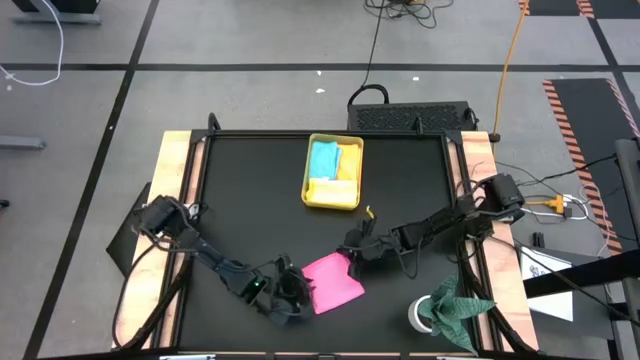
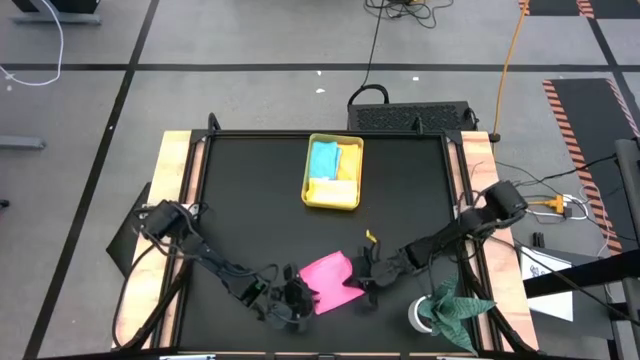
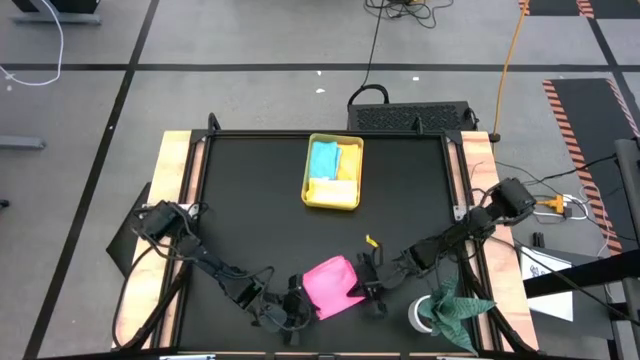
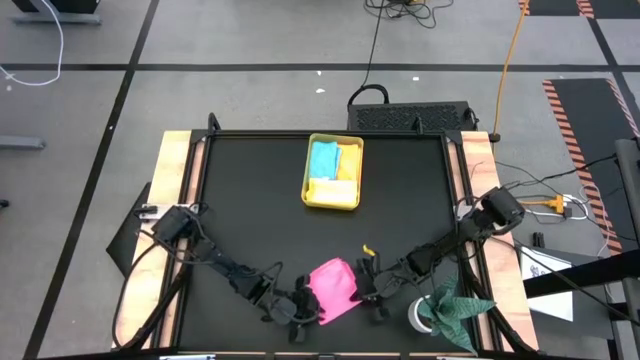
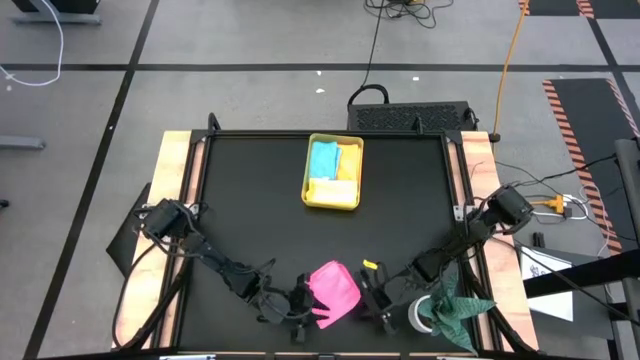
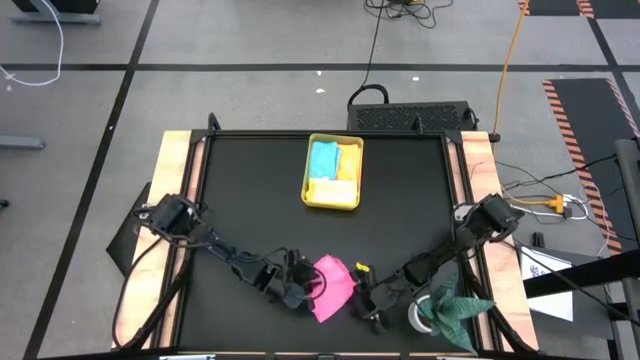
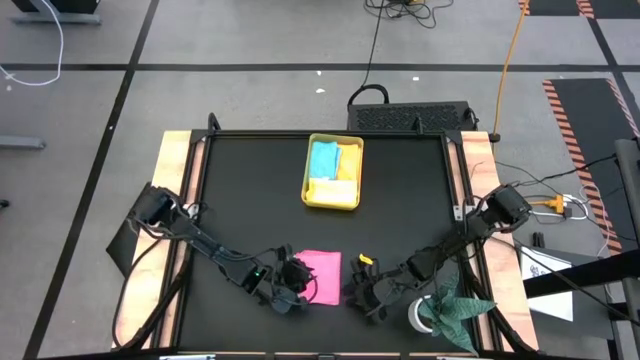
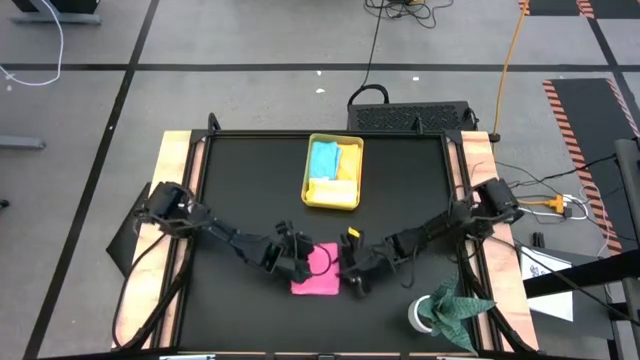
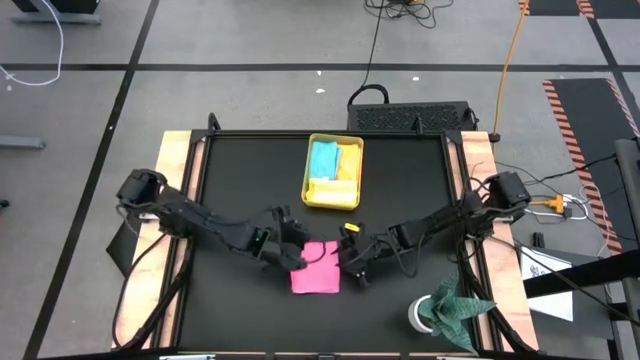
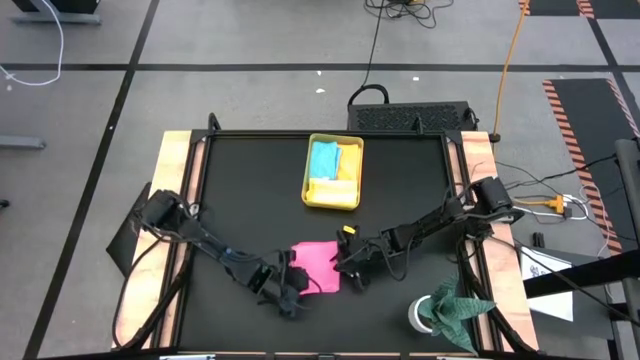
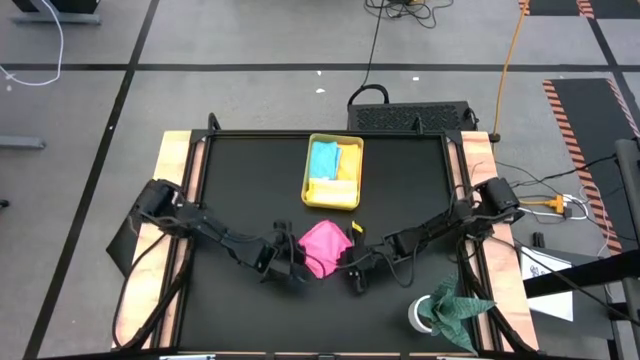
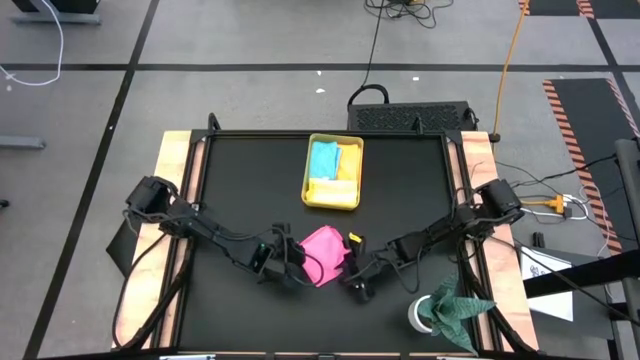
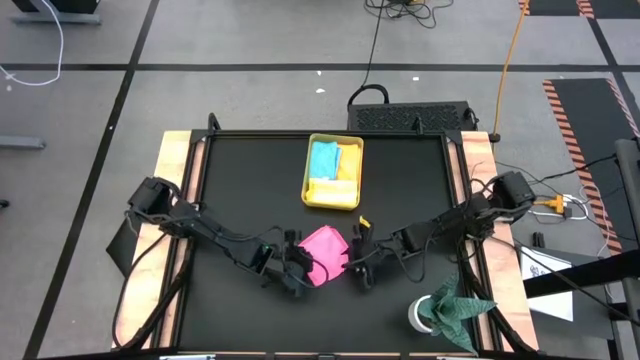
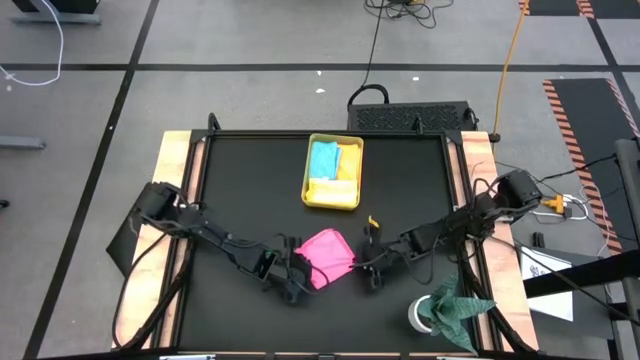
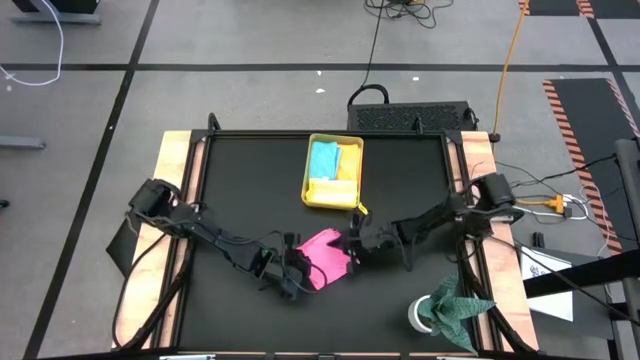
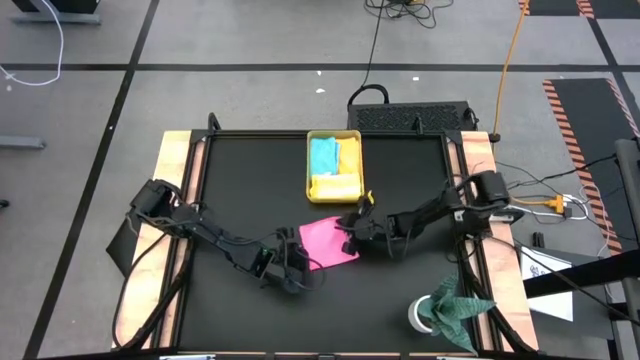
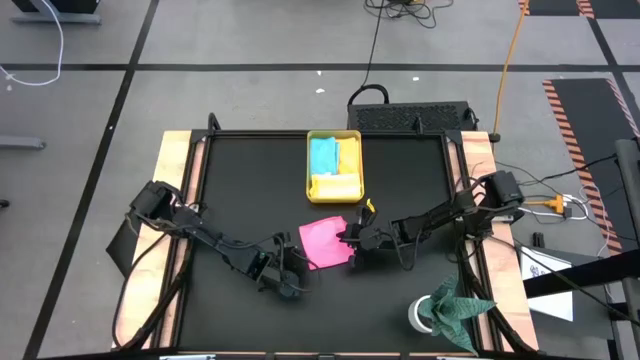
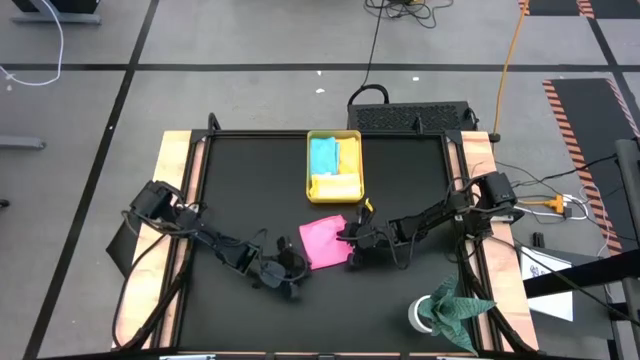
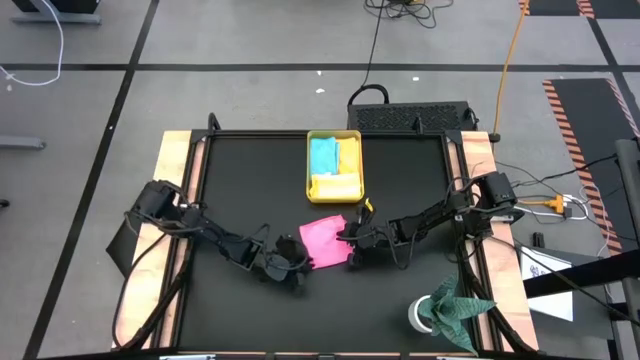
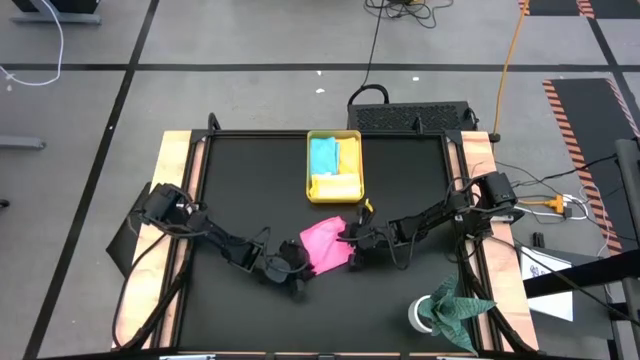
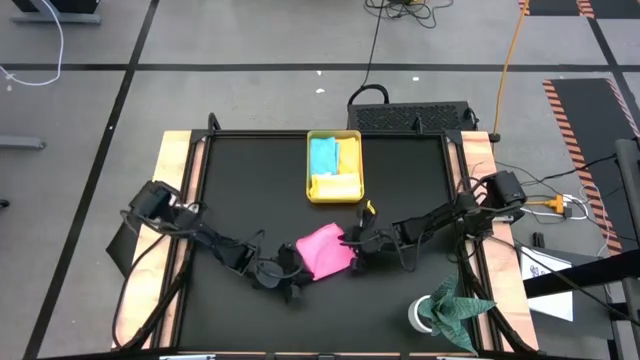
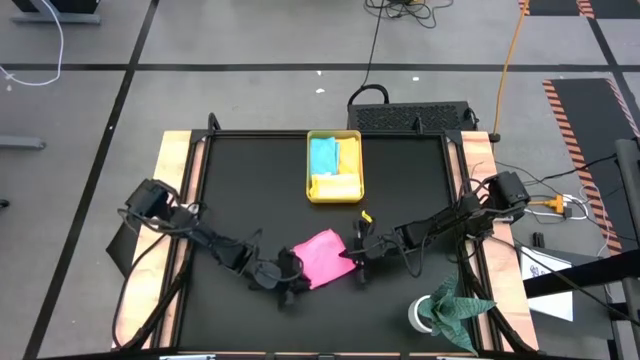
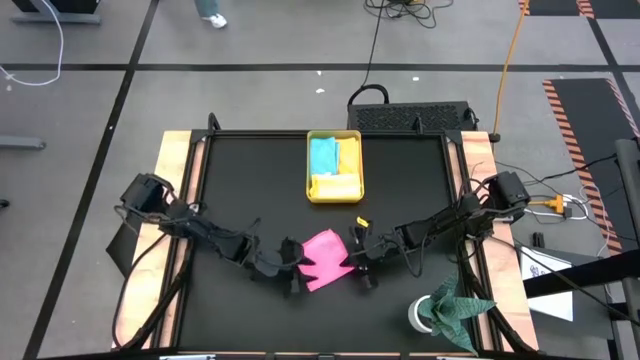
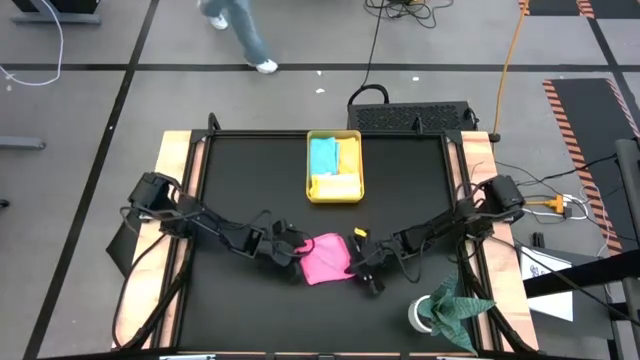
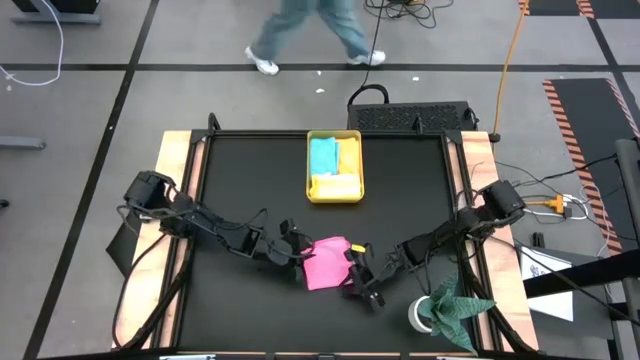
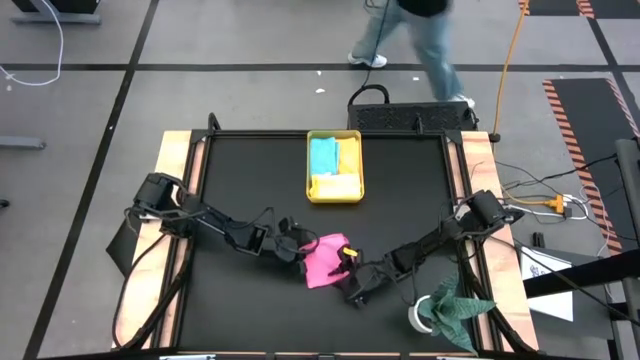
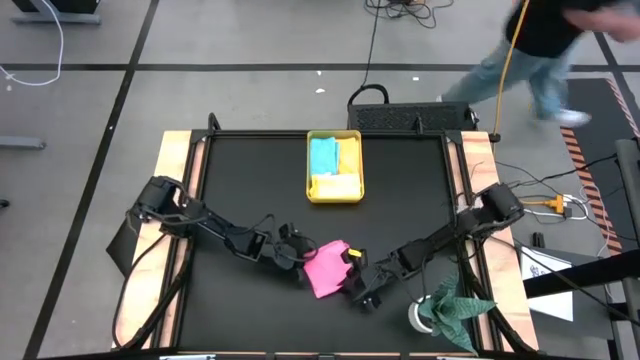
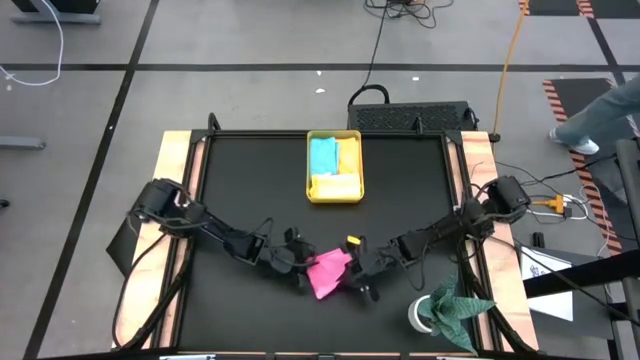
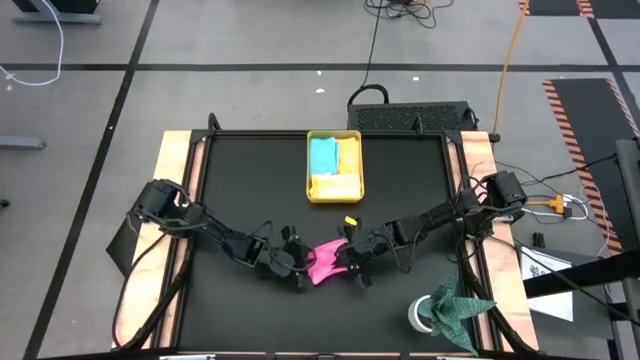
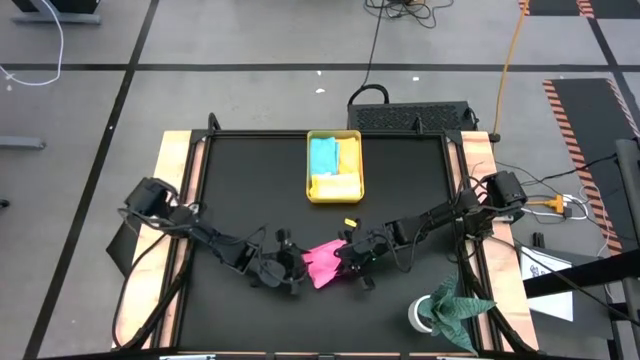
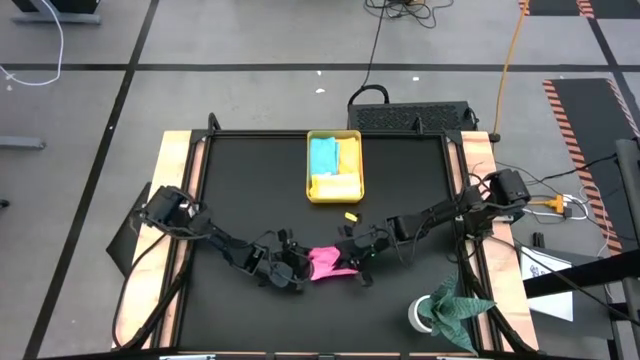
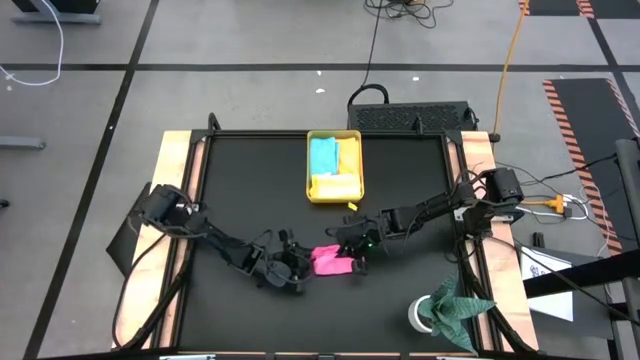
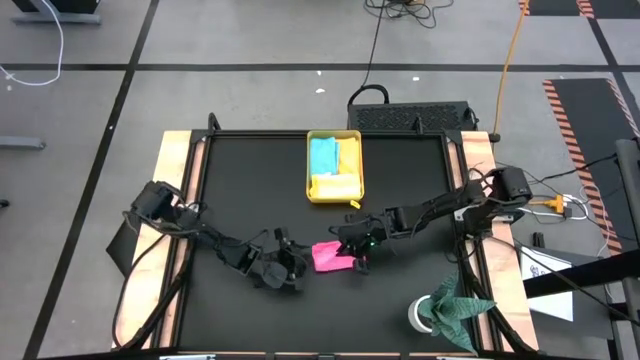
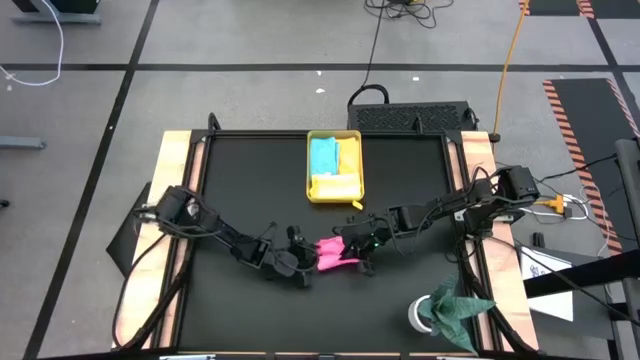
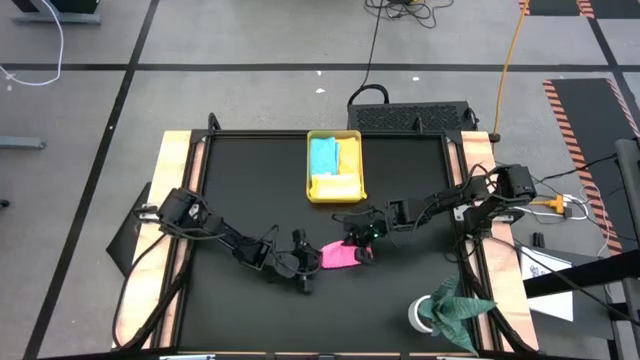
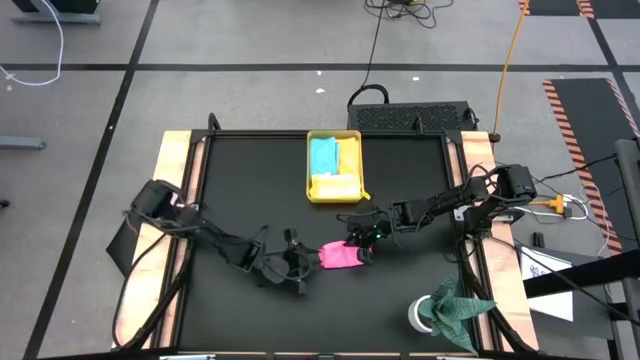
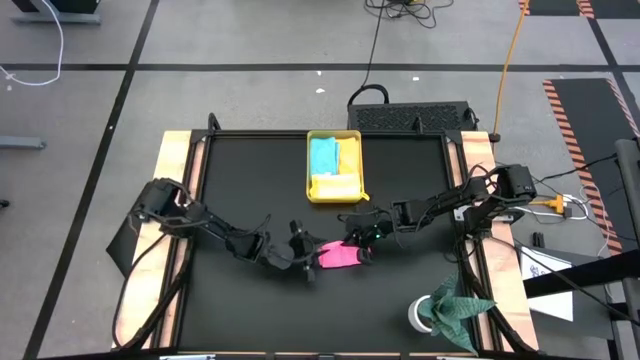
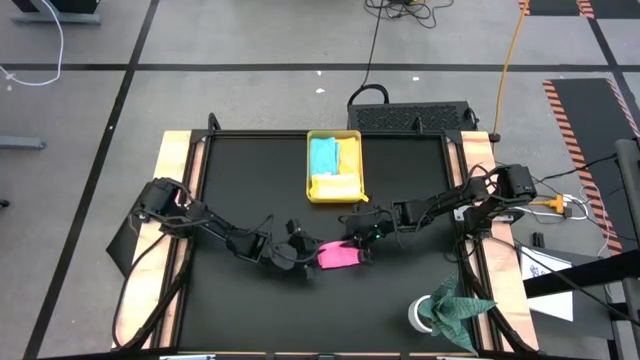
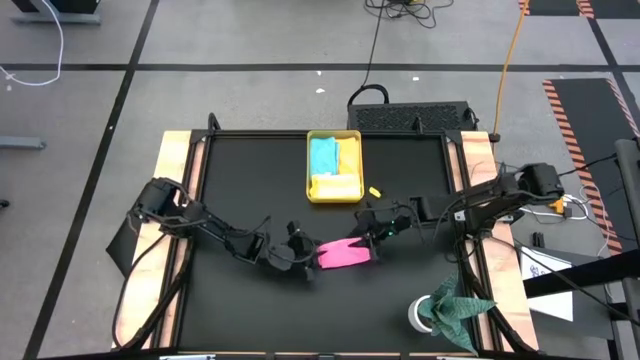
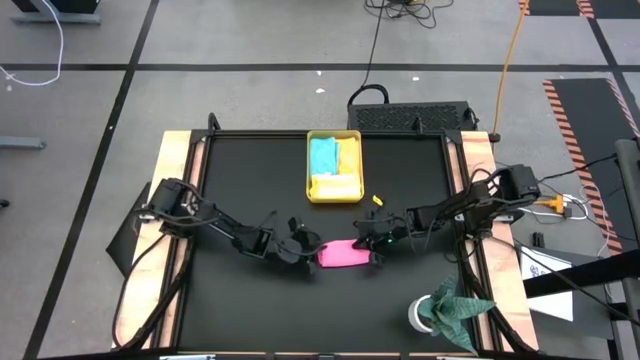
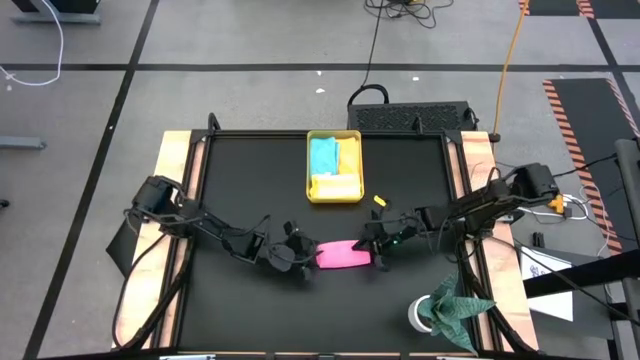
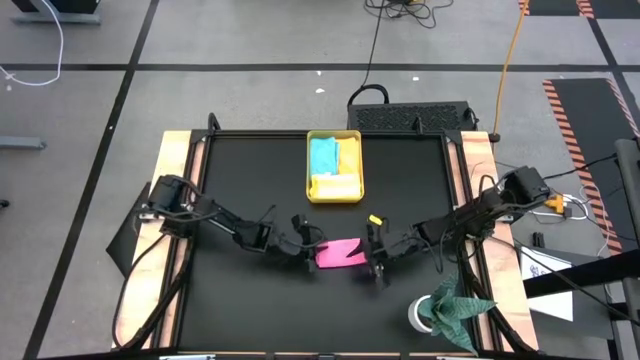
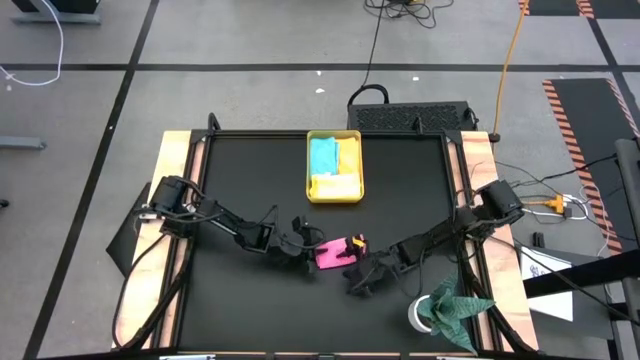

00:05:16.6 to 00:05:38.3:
Task: Fold microfiber towels
Fold the pink towel
